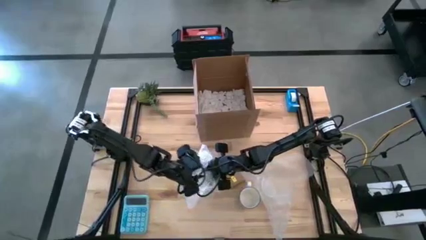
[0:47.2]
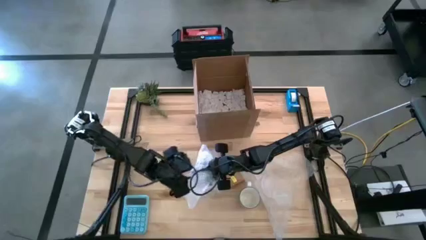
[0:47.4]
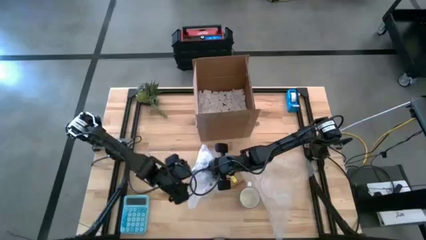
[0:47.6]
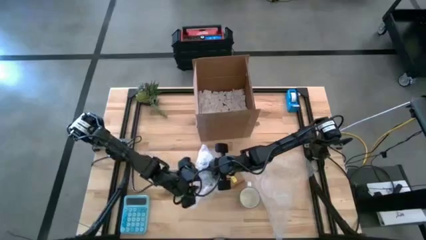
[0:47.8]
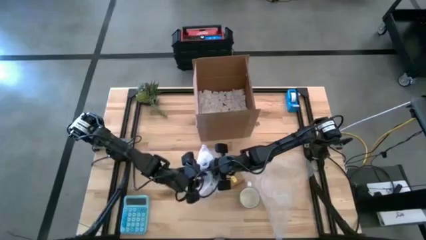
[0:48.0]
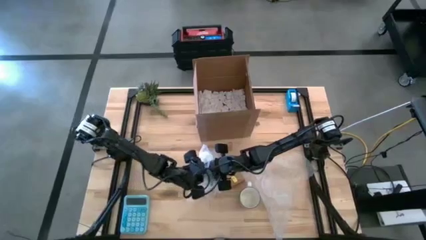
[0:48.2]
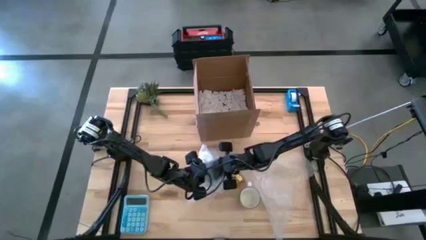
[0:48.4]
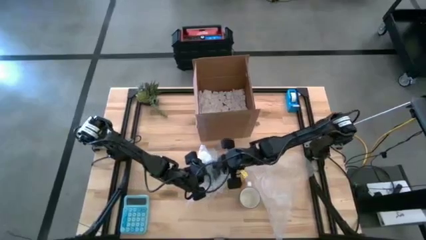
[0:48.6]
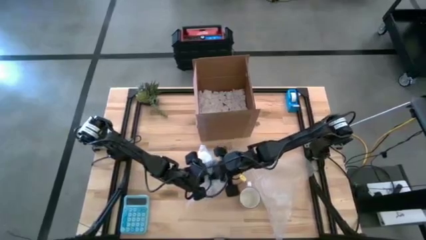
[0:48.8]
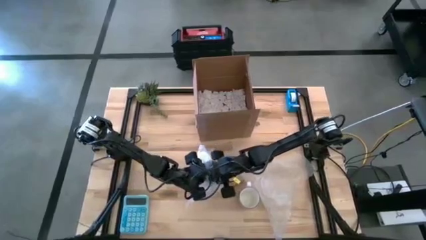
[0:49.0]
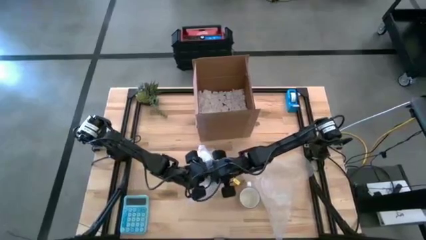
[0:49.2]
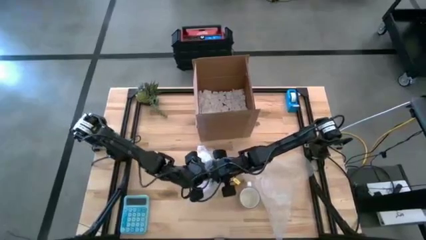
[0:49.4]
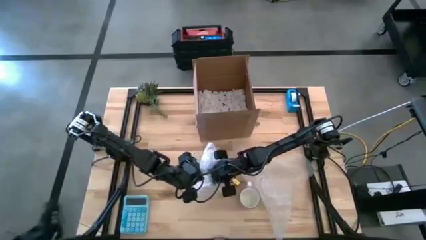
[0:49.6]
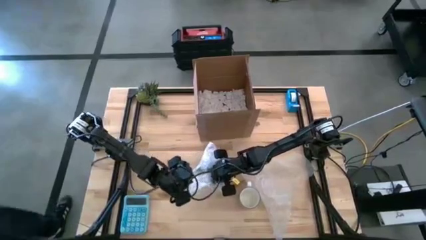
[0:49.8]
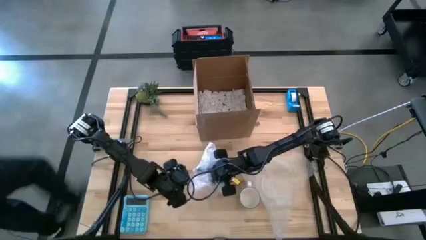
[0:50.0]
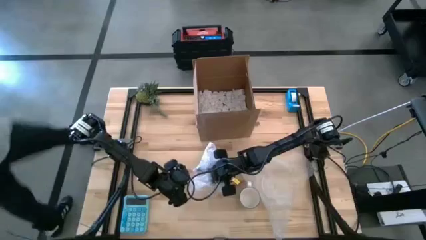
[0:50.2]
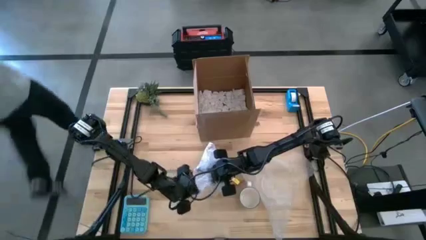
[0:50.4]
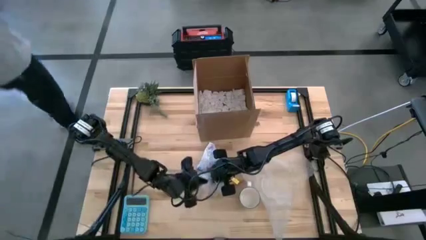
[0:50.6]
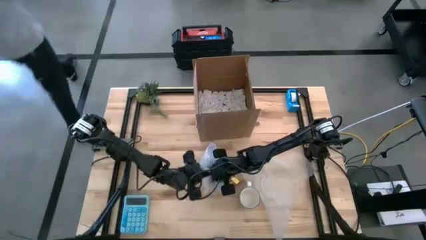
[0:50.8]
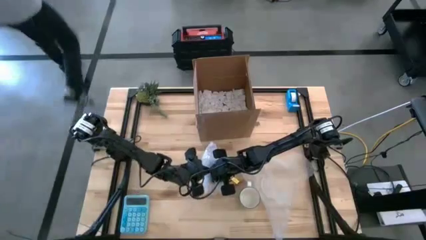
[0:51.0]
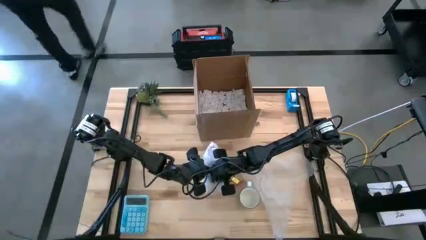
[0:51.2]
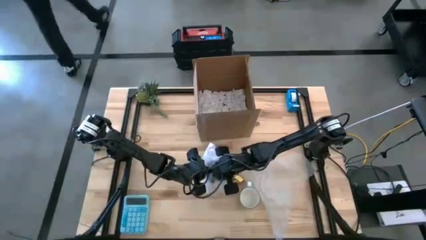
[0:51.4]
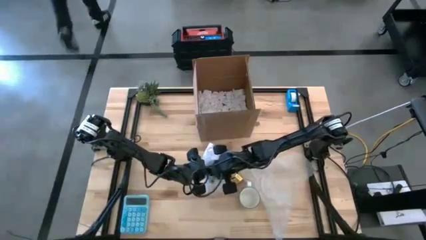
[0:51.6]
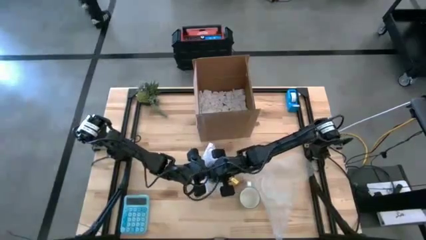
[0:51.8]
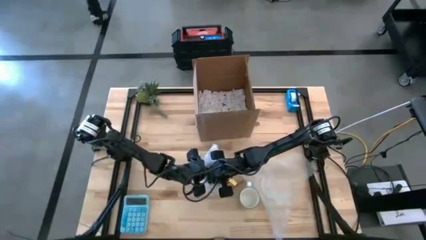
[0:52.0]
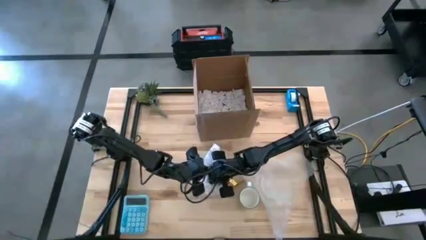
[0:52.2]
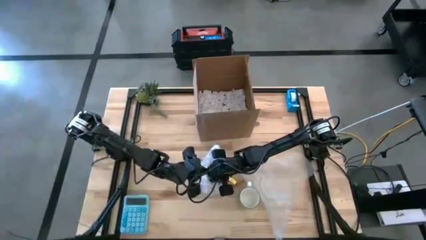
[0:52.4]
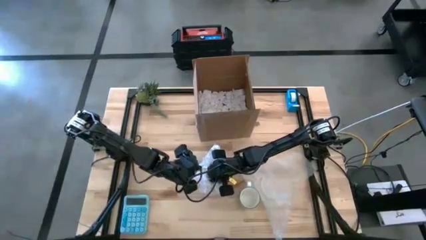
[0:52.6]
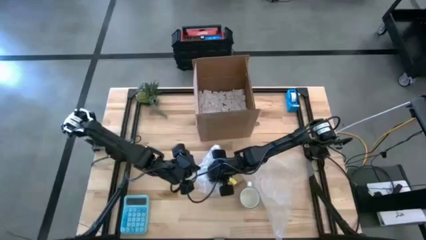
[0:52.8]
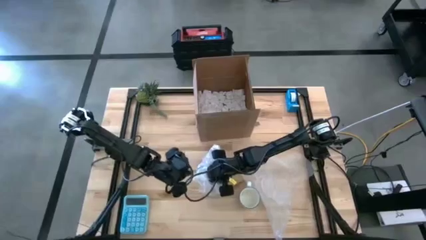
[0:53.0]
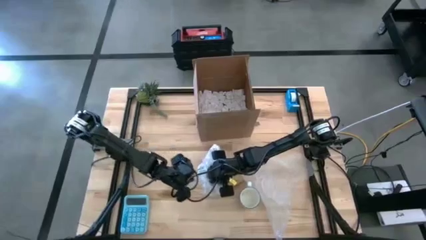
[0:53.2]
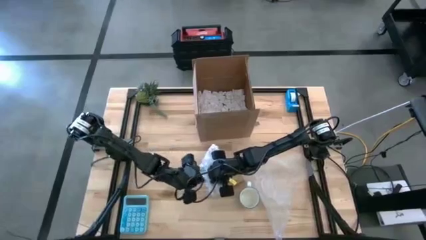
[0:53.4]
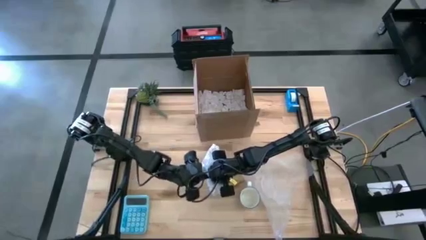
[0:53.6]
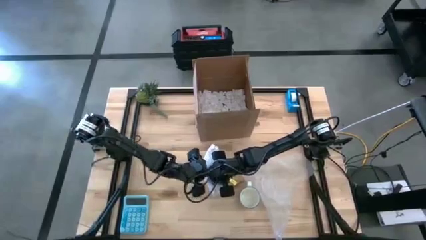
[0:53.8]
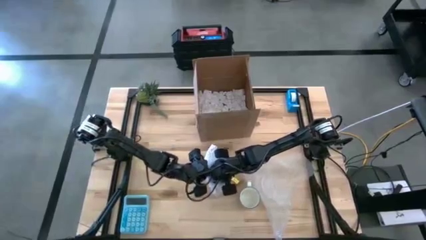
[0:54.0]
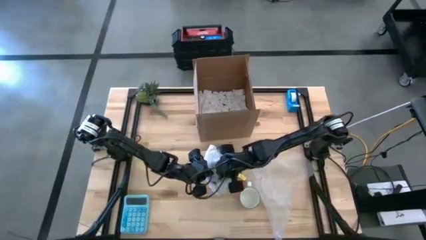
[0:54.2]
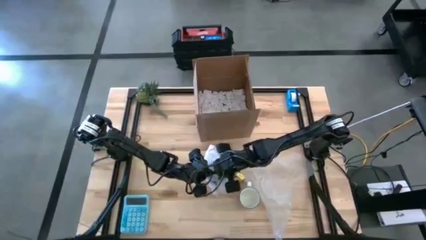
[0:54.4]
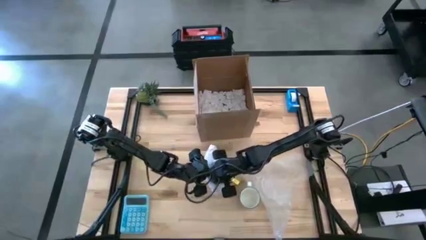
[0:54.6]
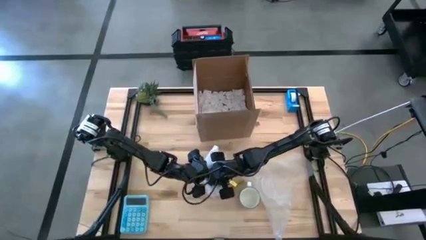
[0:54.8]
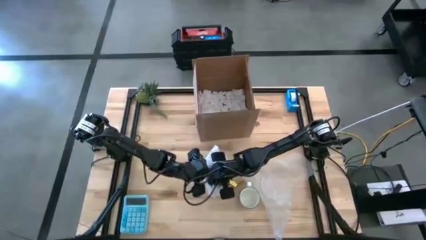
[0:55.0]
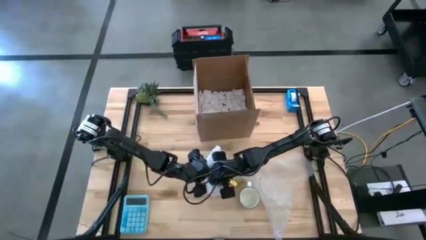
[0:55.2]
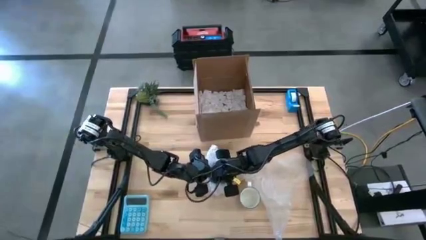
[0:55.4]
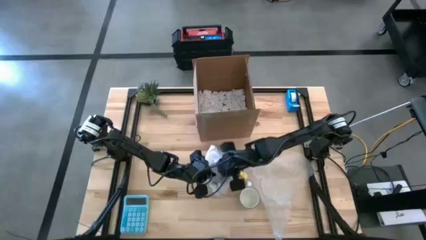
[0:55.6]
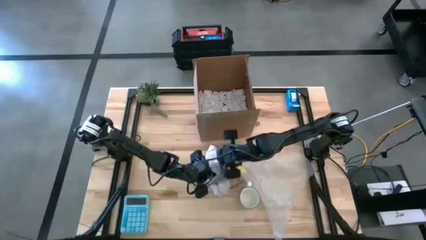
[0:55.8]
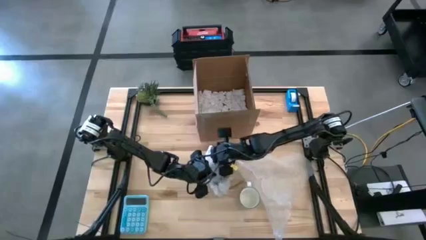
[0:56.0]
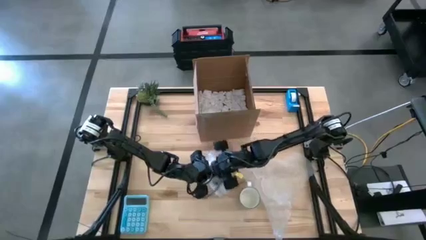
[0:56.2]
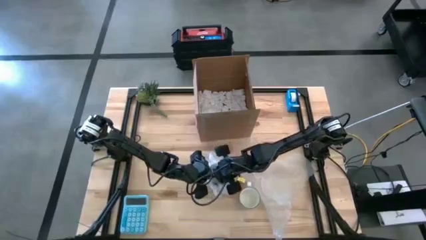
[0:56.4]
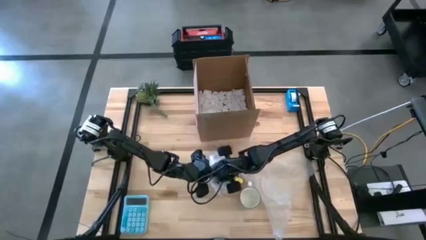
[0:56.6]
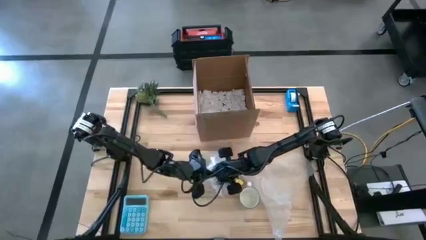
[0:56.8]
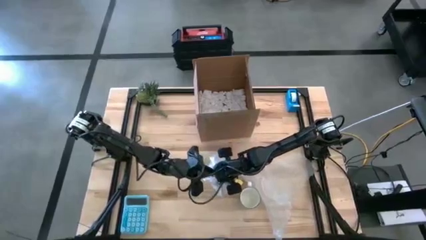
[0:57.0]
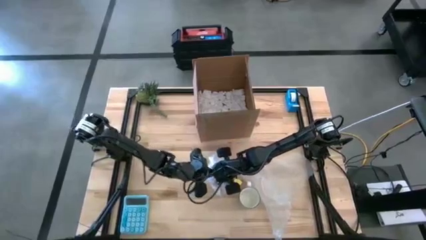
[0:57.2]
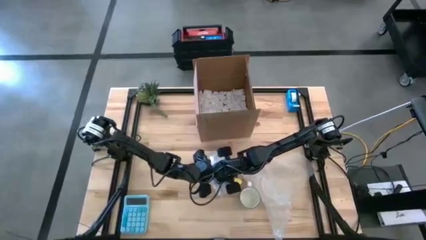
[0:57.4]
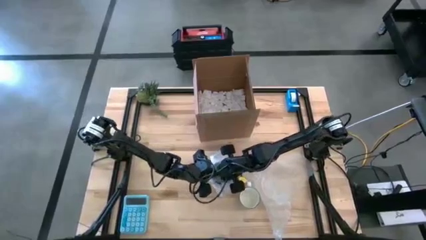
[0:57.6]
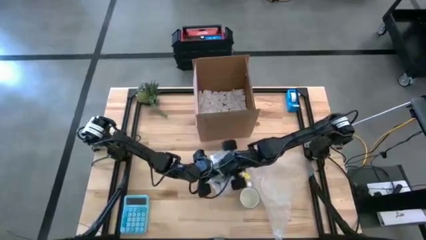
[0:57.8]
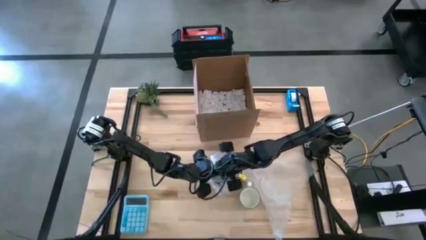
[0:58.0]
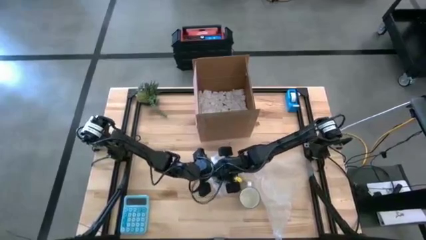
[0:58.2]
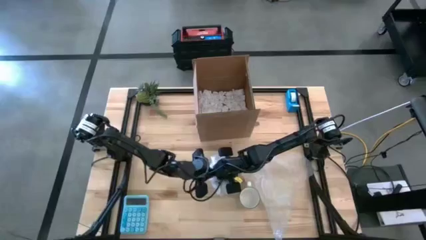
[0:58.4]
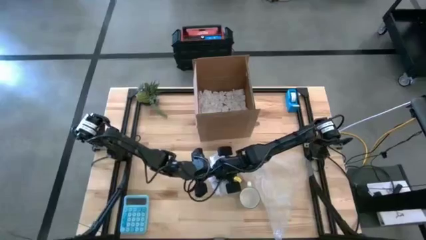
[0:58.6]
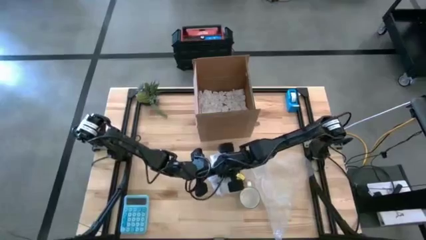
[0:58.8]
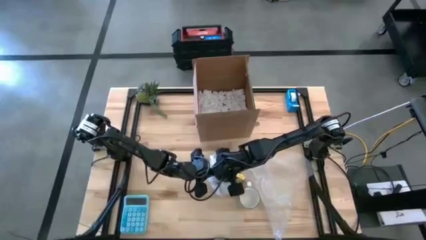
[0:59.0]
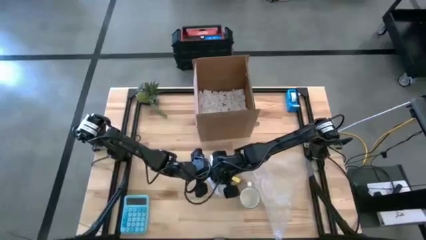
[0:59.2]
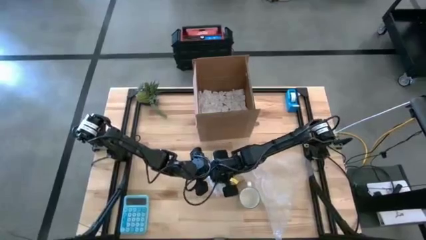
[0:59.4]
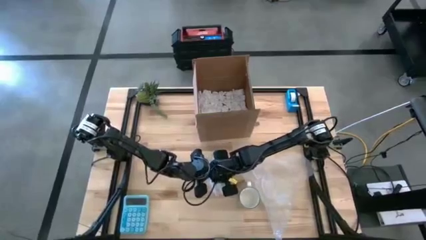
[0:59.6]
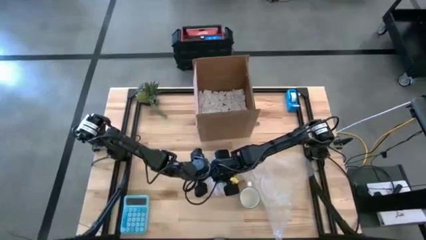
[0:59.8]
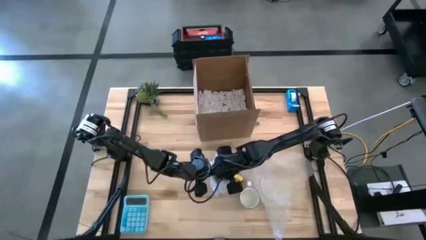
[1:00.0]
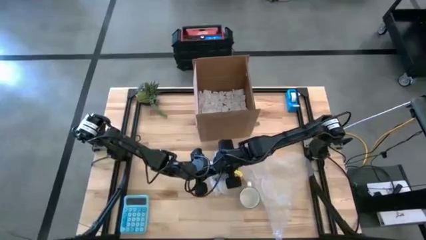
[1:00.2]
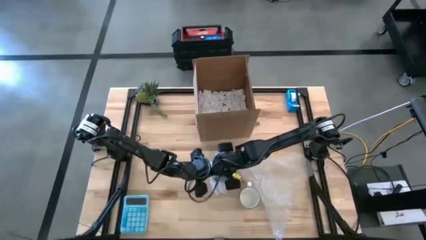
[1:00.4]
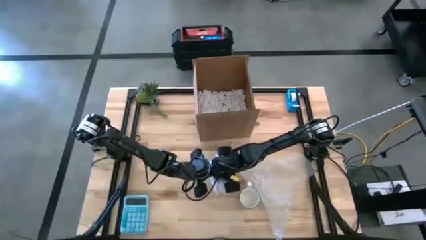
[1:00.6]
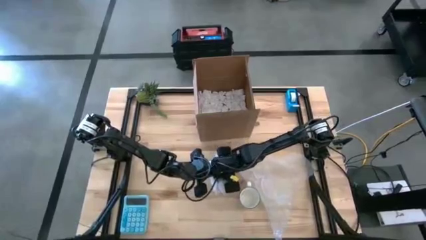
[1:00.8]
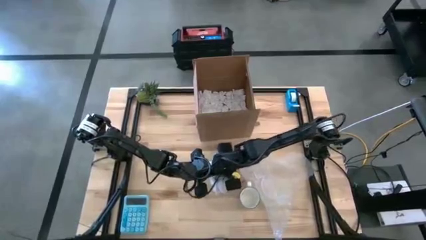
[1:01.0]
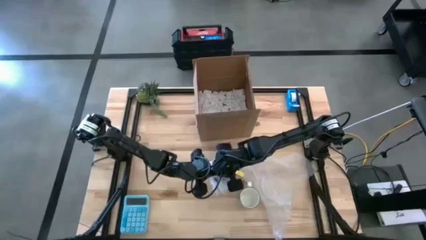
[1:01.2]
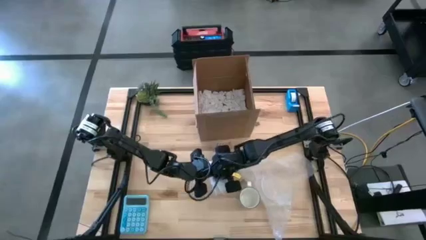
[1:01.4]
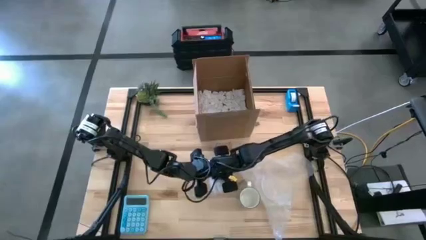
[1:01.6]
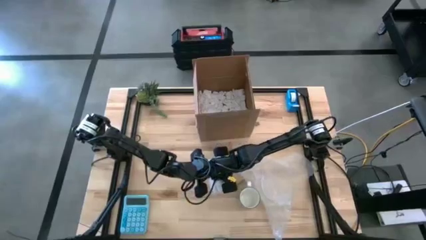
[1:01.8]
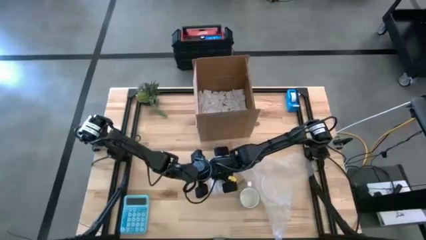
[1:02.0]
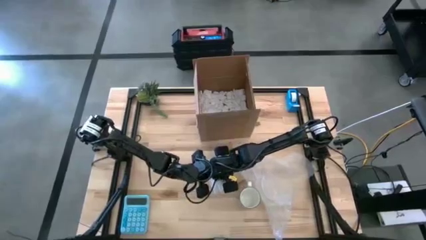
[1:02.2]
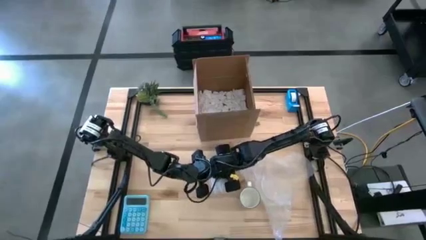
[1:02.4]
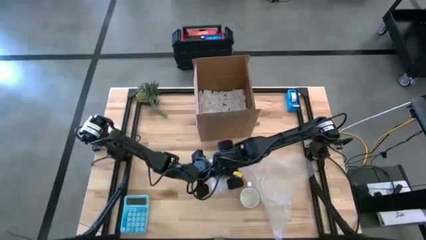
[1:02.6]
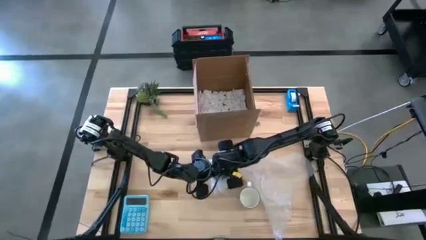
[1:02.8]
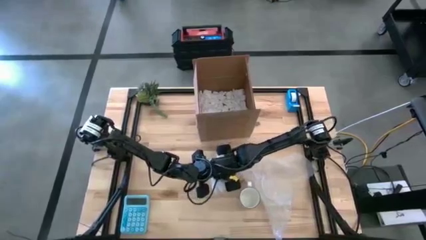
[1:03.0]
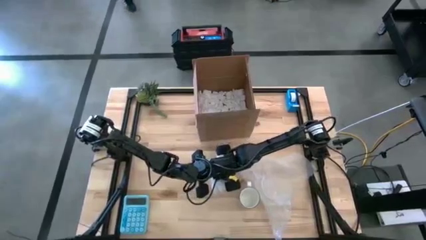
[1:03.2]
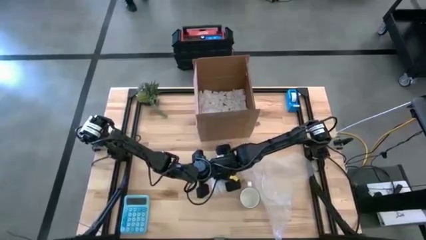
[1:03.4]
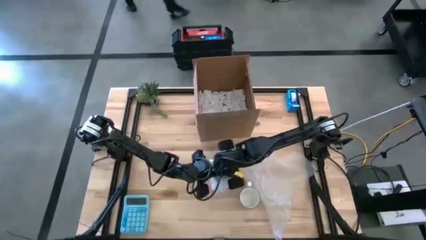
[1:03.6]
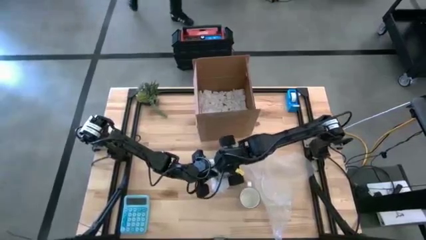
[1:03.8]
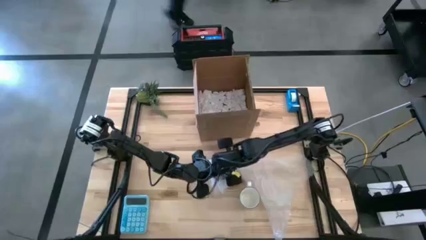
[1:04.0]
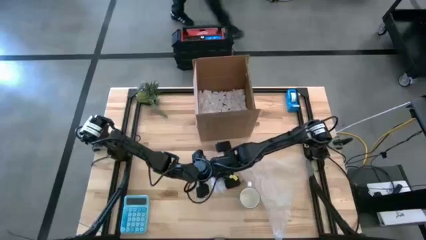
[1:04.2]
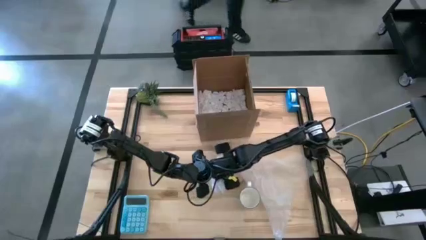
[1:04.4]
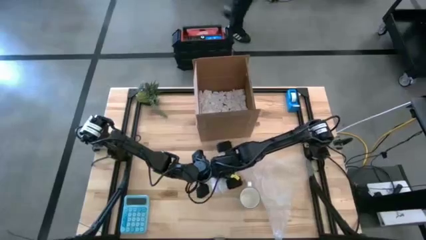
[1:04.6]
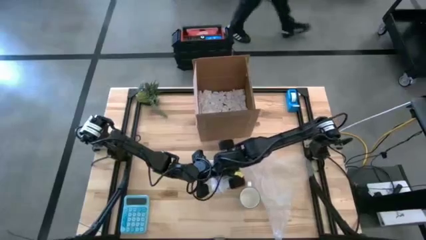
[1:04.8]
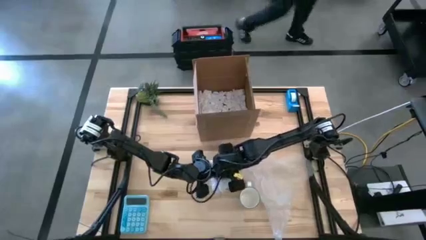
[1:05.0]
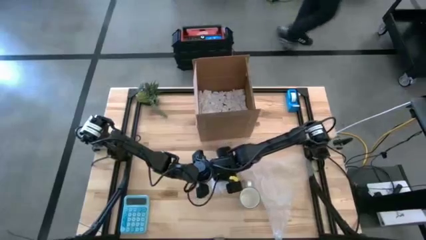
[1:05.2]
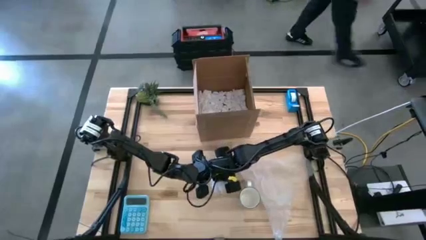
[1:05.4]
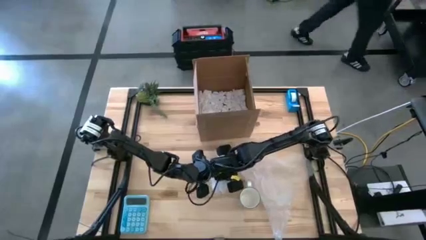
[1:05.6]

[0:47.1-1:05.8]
Task: wrap mug
Wrap the green mug with the bubble wrap
